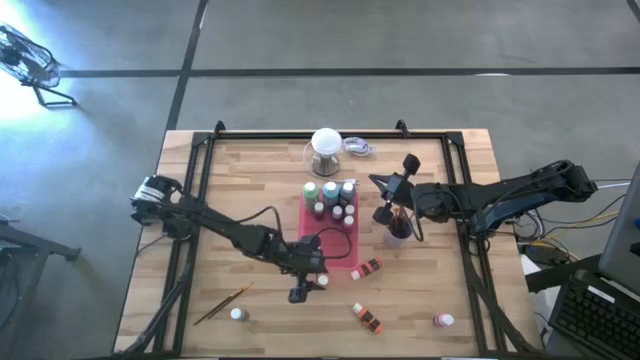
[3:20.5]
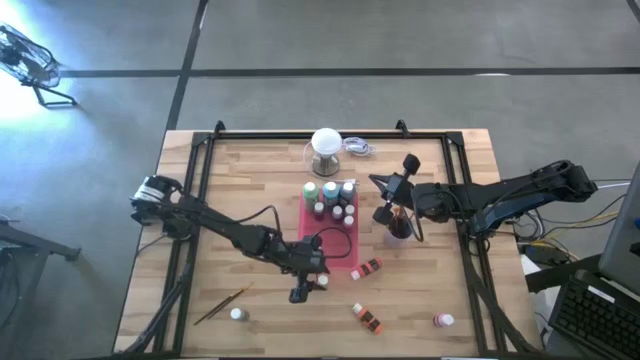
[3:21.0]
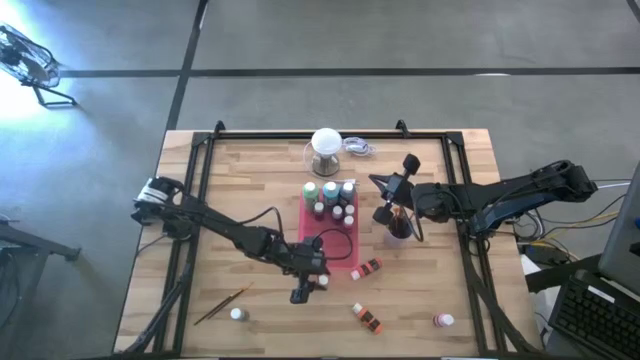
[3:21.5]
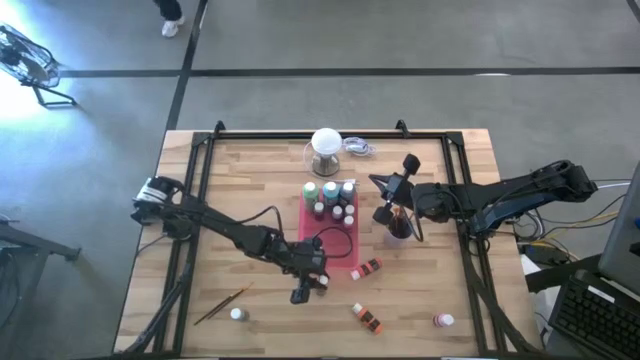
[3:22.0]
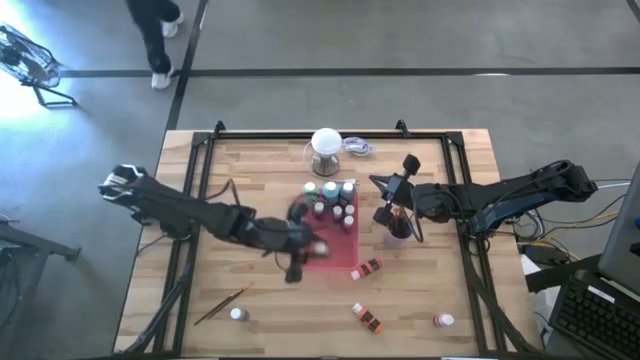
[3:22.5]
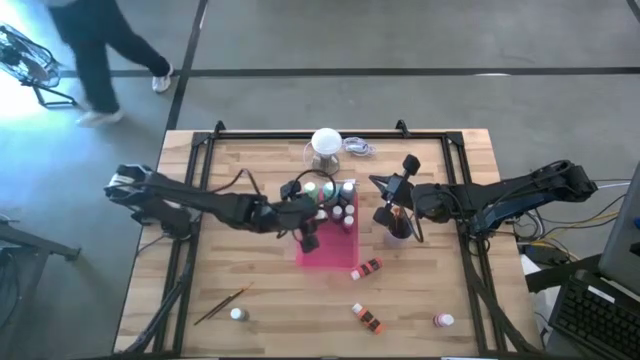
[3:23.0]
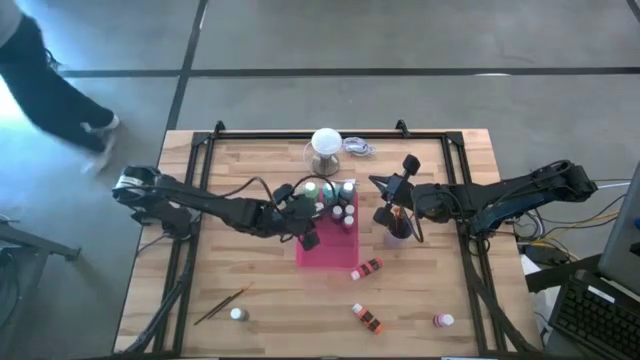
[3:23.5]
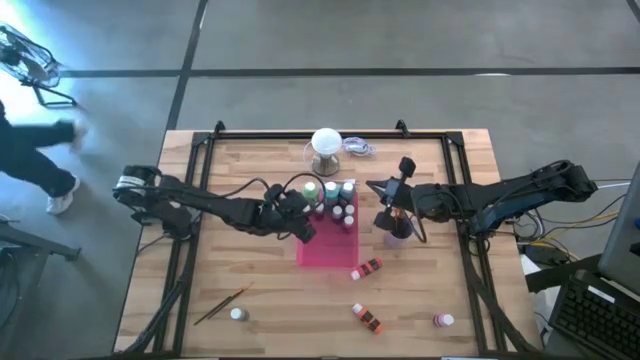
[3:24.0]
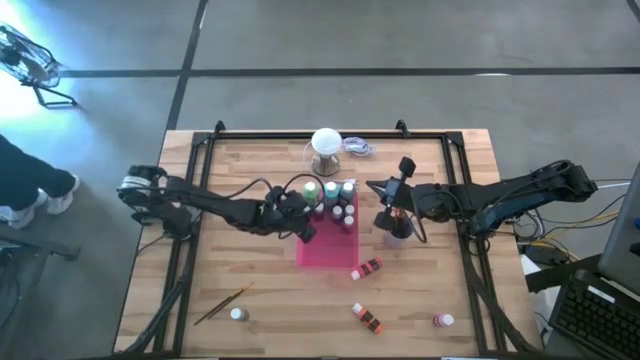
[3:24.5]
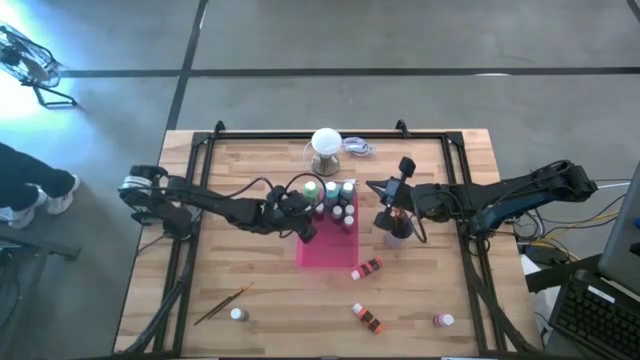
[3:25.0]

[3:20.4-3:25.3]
Task: Pick & Place Paint Supplies
Put the small yellow paint bottle into the red bin

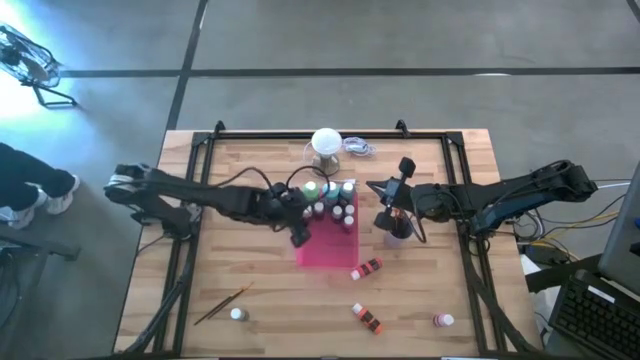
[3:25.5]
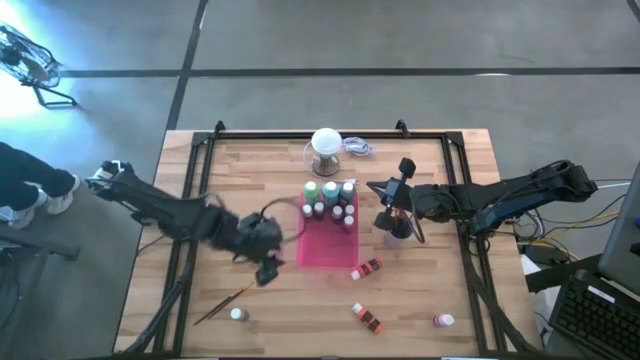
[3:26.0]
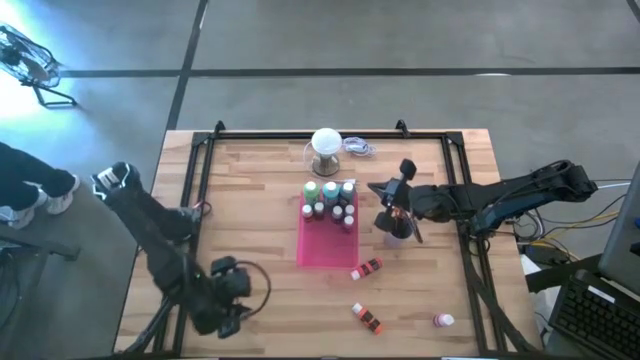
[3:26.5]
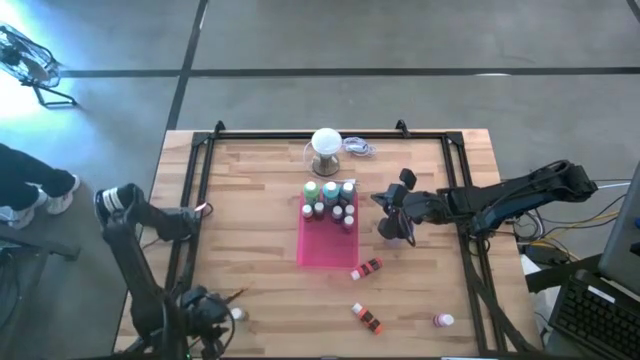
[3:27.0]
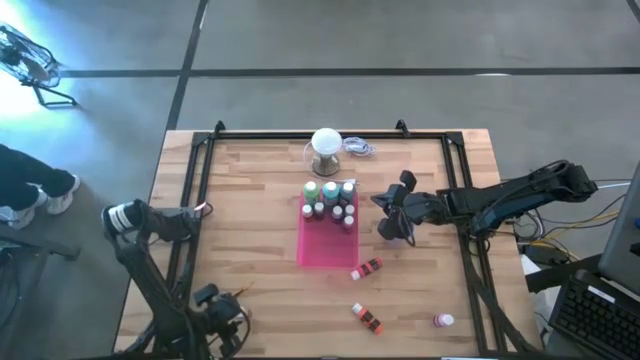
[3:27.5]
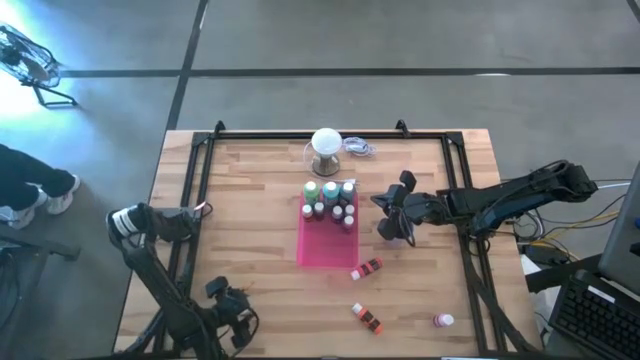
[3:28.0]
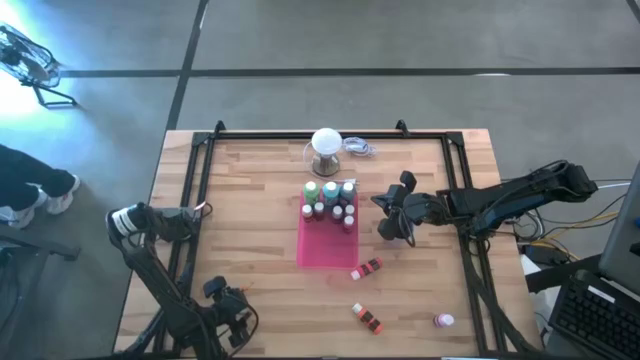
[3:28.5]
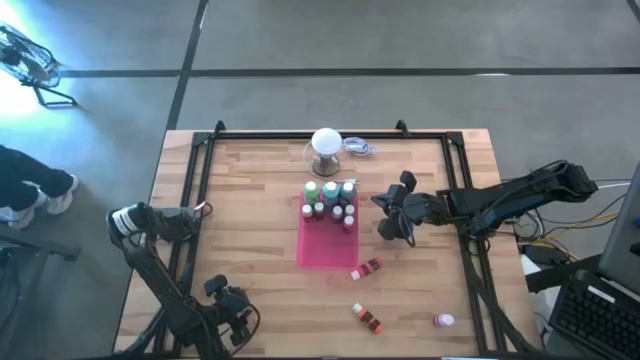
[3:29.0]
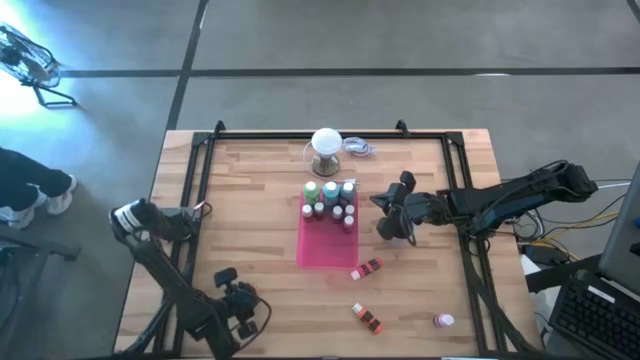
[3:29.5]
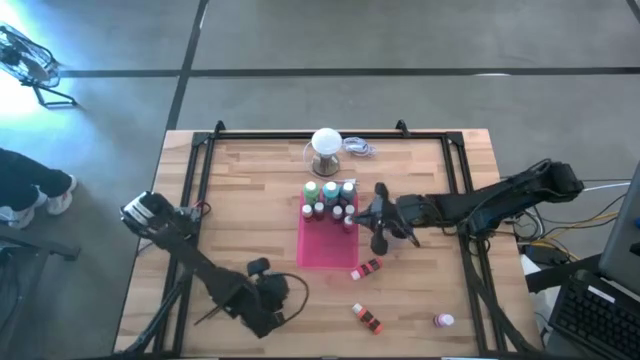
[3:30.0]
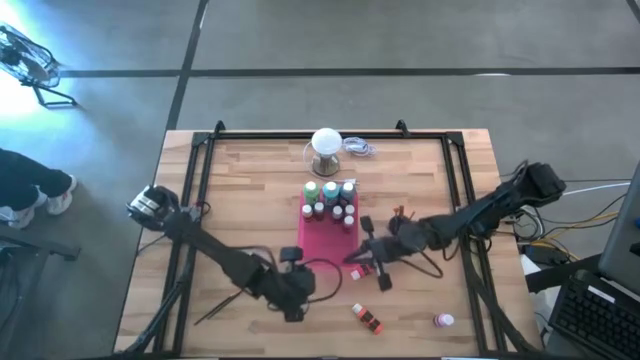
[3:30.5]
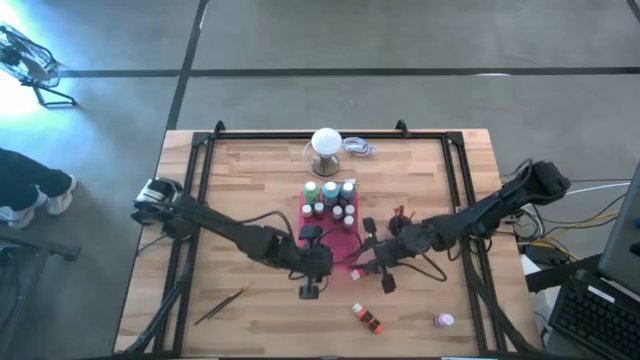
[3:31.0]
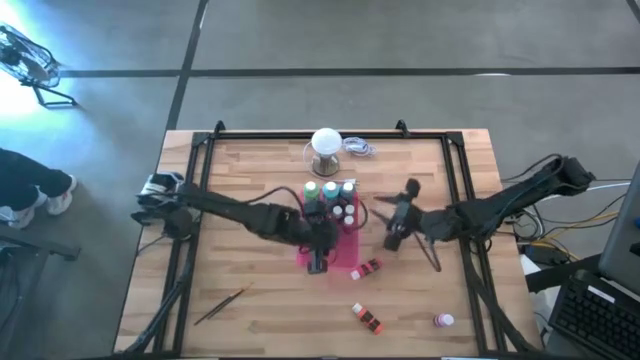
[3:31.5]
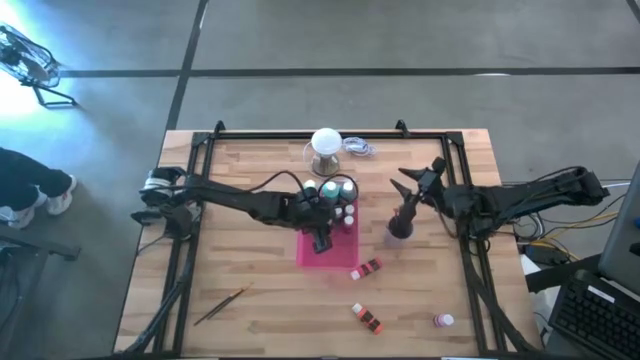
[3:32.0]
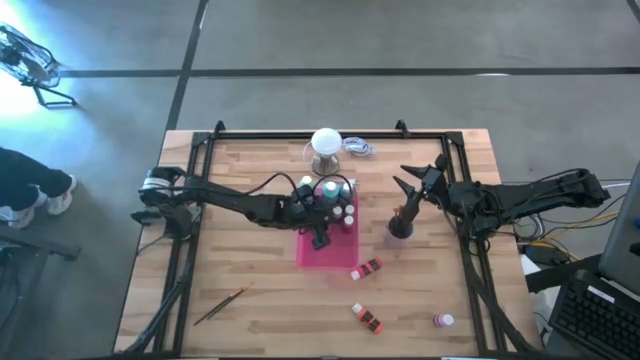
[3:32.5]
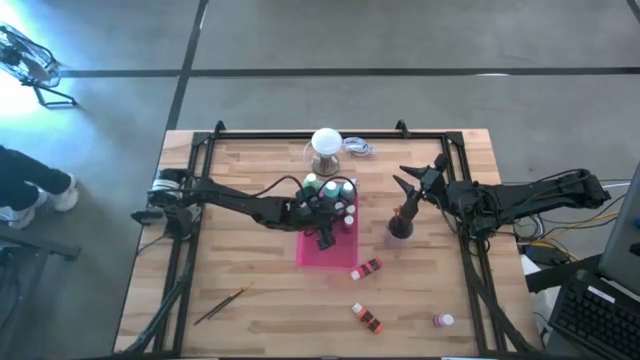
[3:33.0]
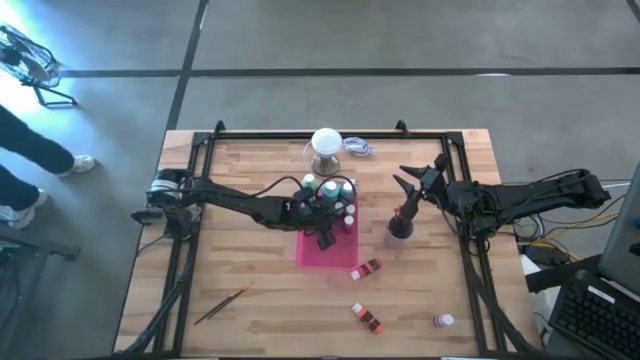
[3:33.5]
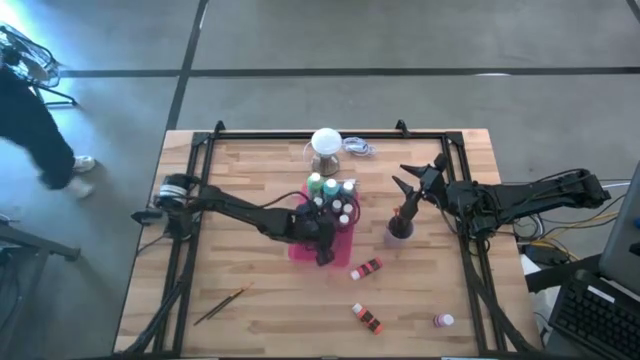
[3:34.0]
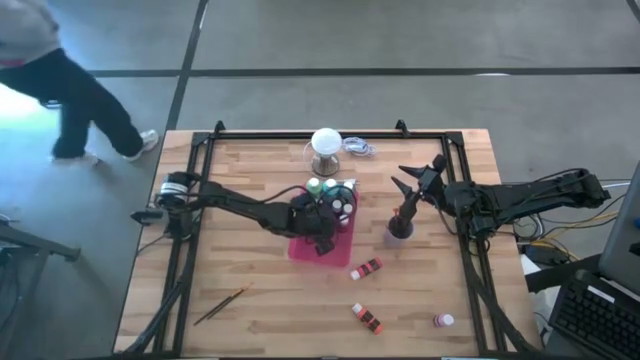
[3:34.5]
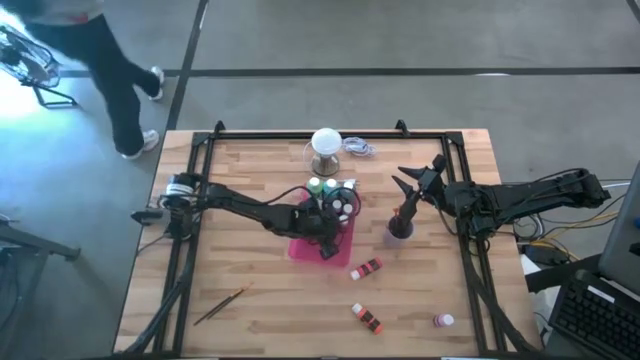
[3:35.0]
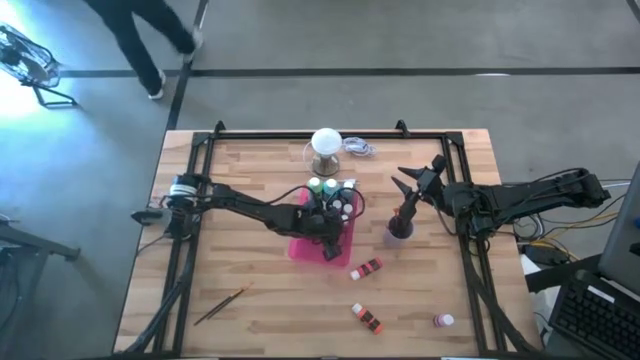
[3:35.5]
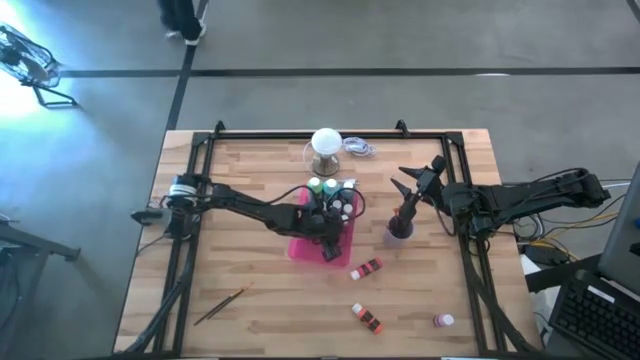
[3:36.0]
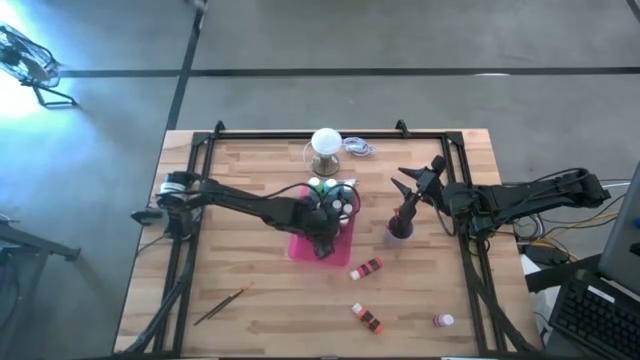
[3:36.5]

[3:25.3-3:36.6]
Put the small gray paint bottle into the red bin

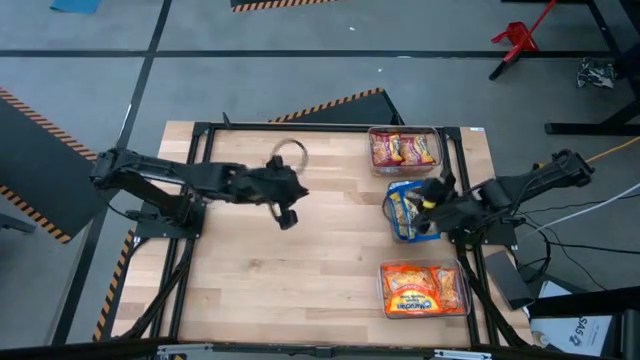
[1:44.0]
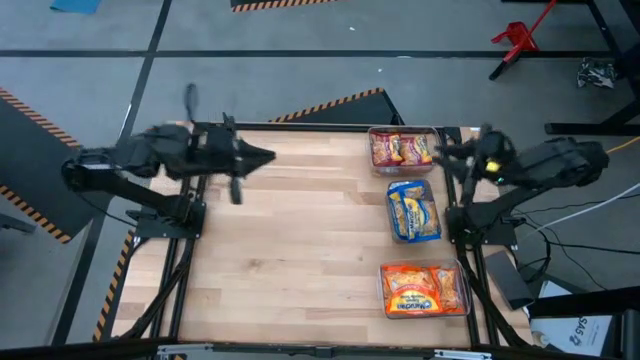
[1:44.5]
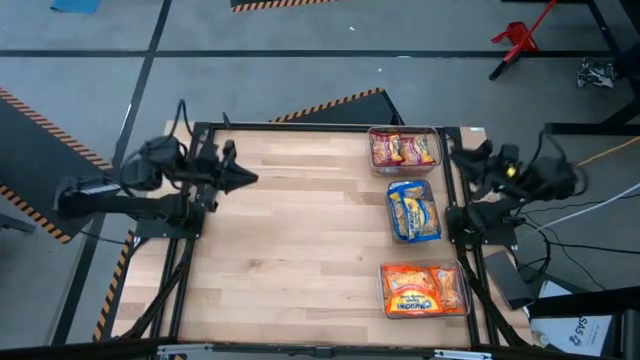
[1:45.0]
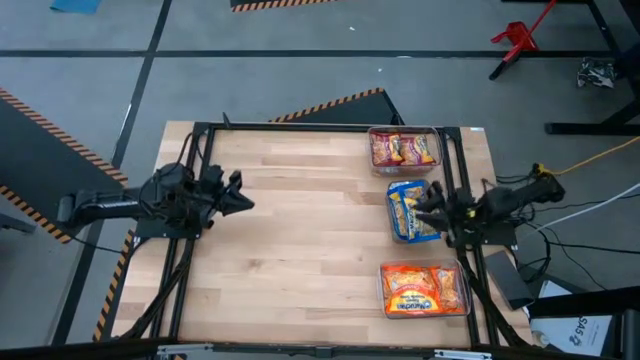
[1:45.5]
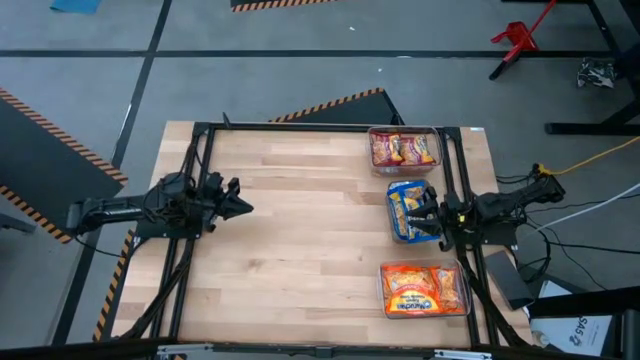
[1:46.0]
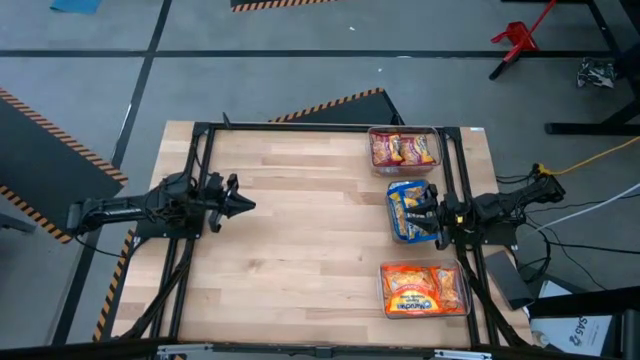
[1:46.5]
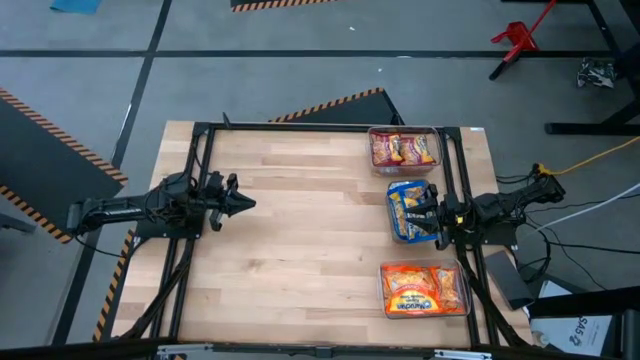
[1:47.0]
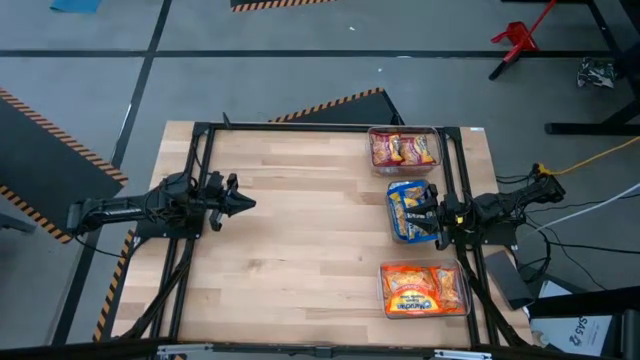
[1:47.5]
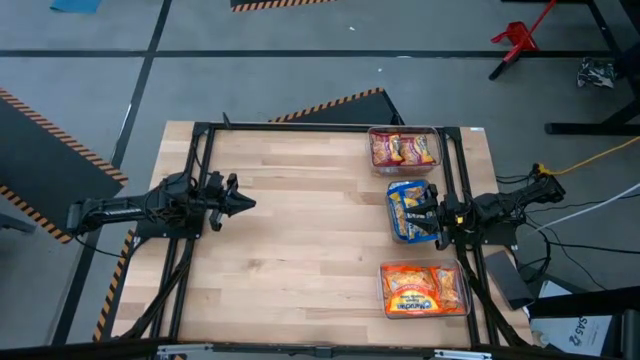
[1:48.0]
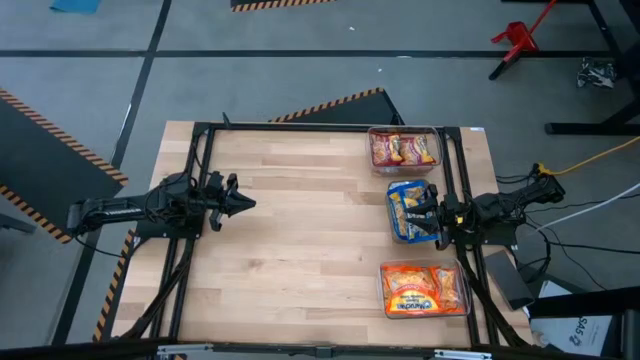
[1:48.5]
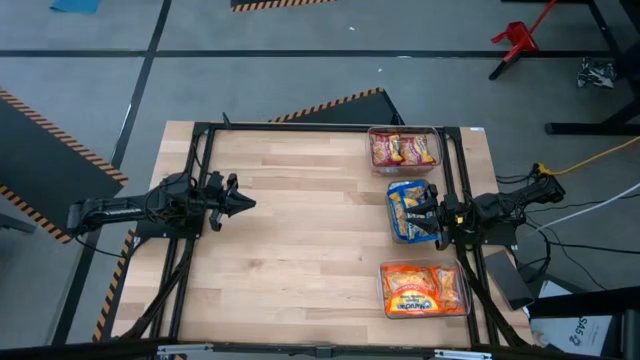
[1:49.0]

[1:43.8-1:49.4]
Task: Sort Maruchan noodles
Return to Home Position
